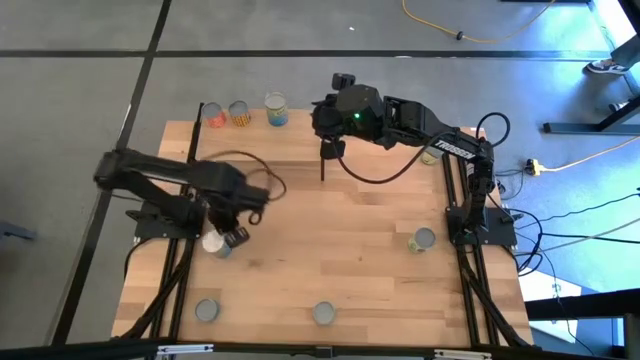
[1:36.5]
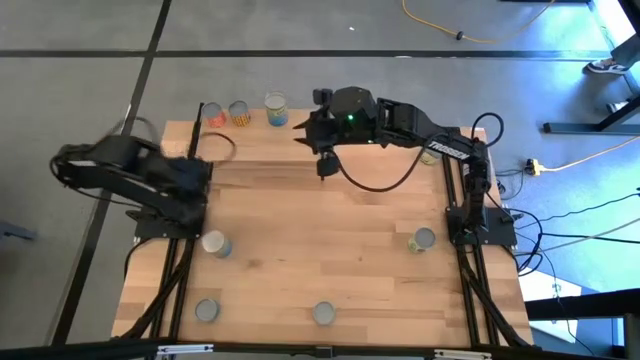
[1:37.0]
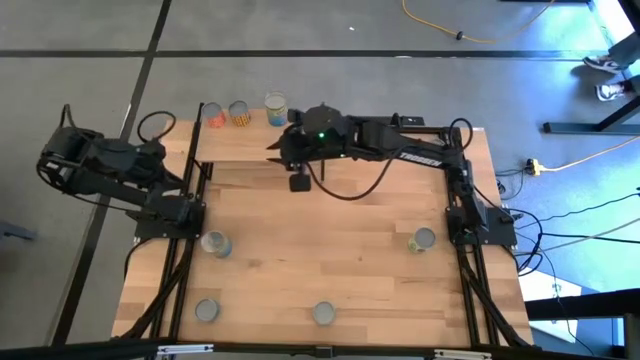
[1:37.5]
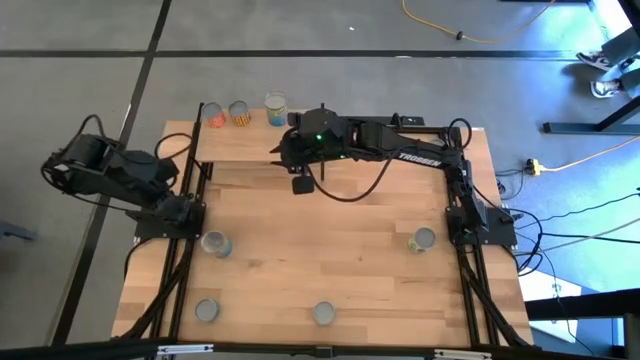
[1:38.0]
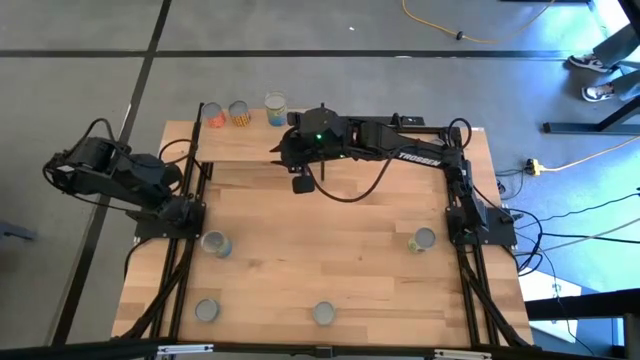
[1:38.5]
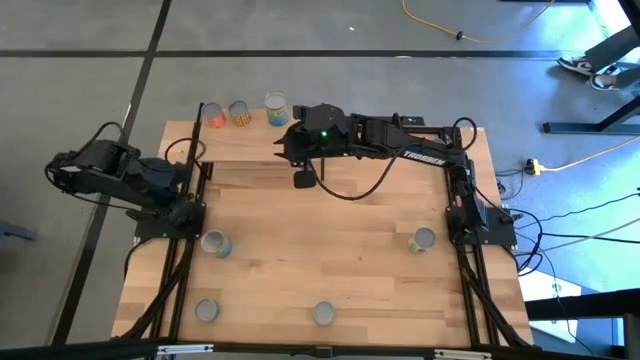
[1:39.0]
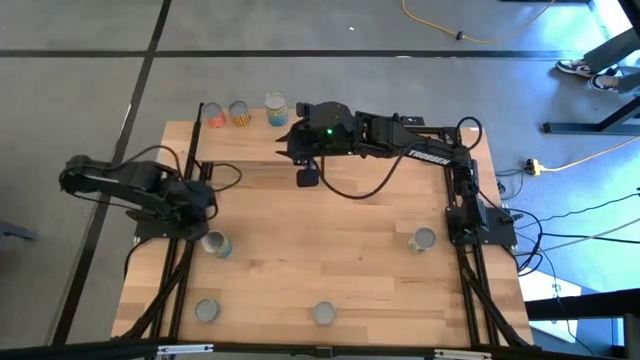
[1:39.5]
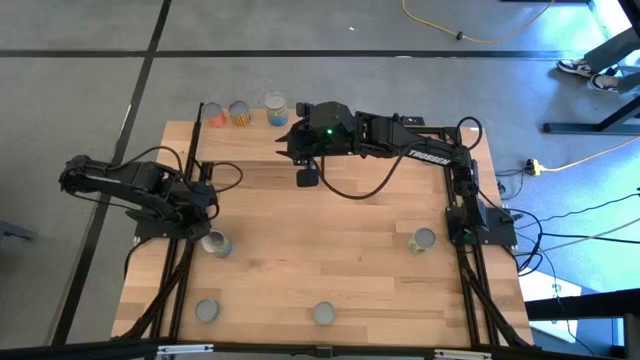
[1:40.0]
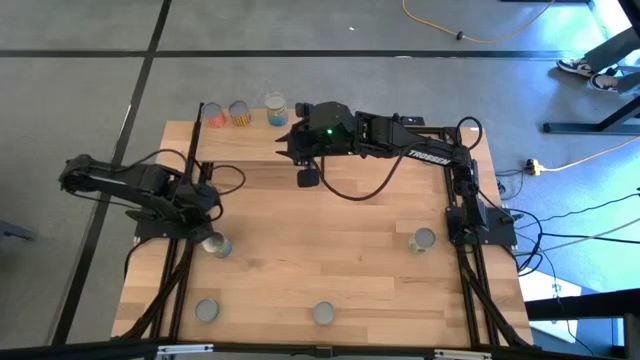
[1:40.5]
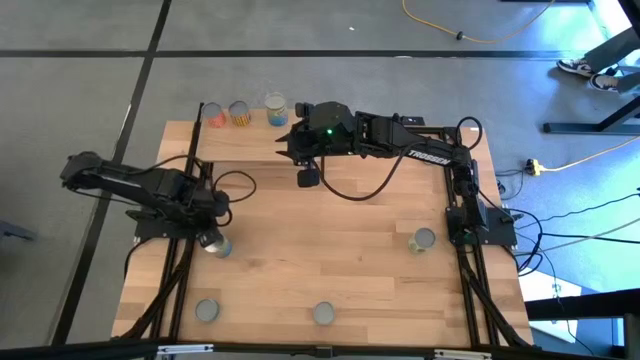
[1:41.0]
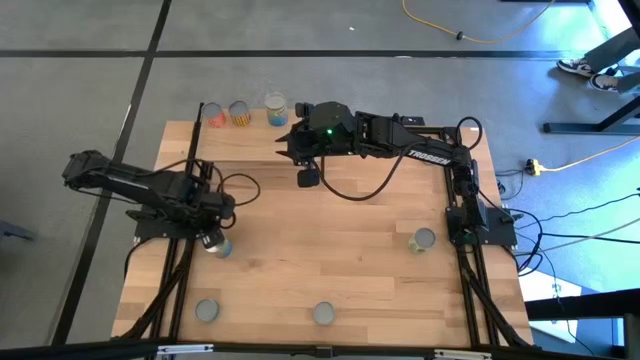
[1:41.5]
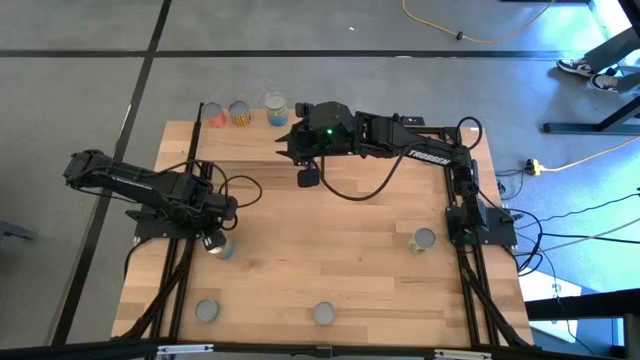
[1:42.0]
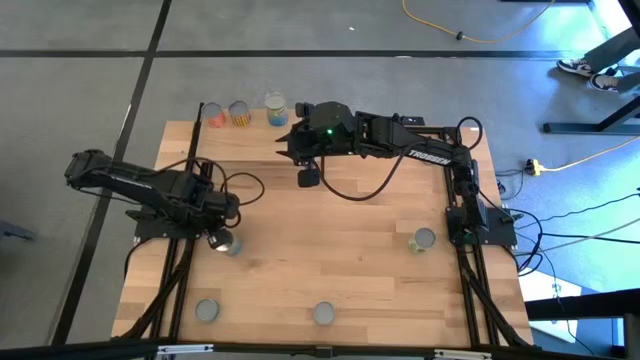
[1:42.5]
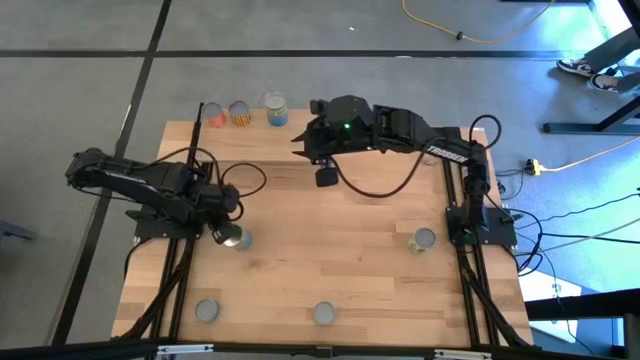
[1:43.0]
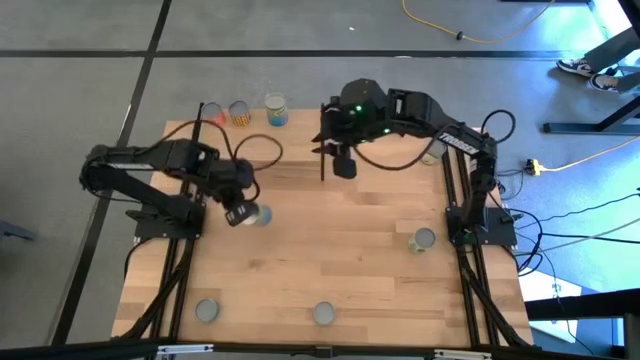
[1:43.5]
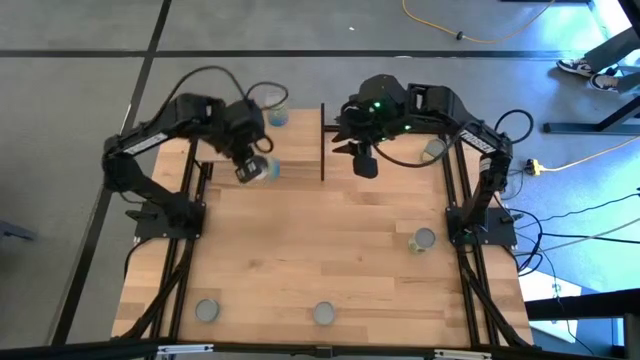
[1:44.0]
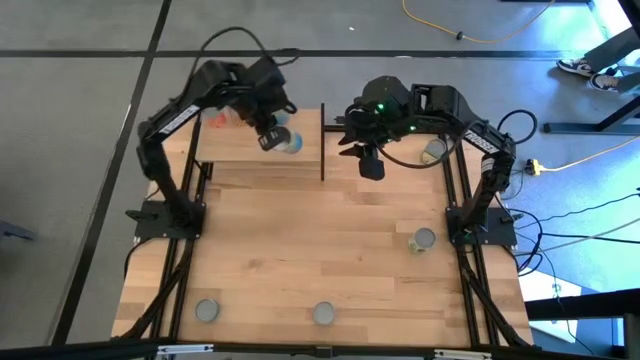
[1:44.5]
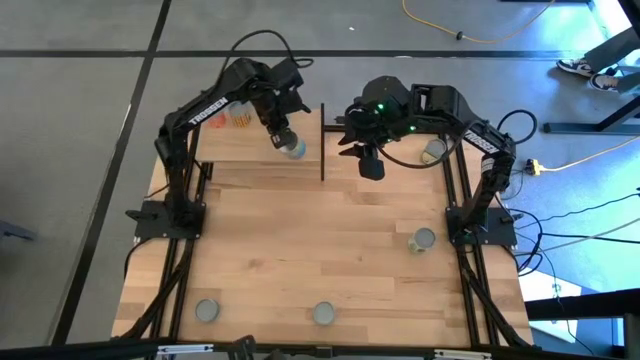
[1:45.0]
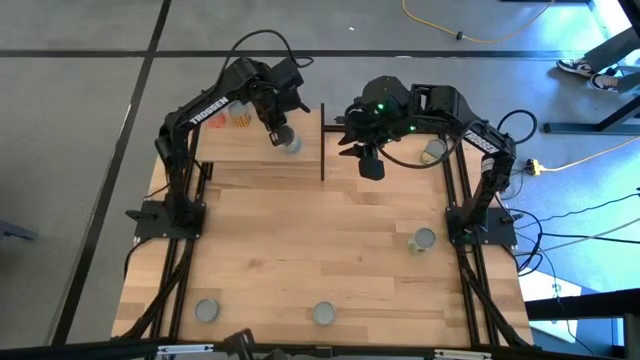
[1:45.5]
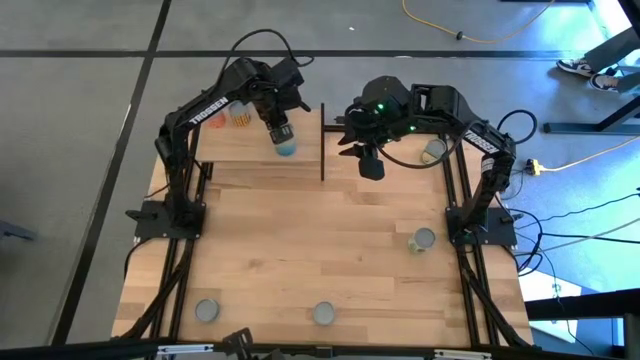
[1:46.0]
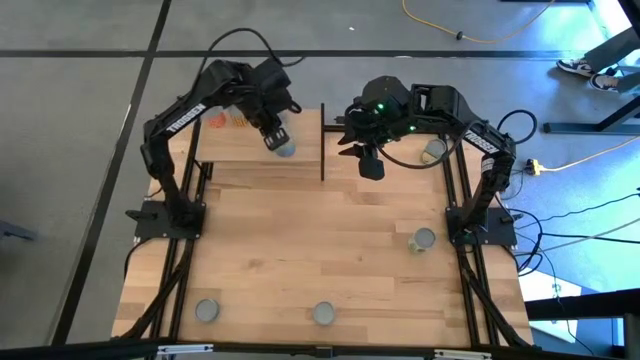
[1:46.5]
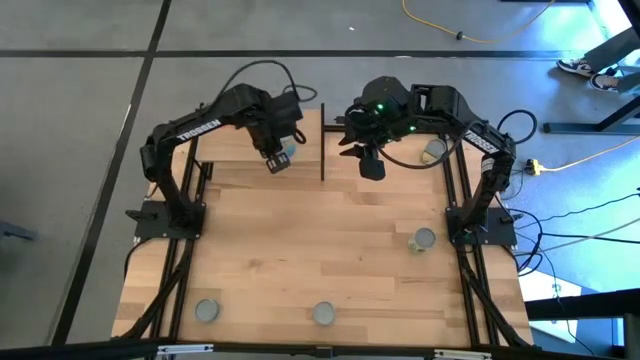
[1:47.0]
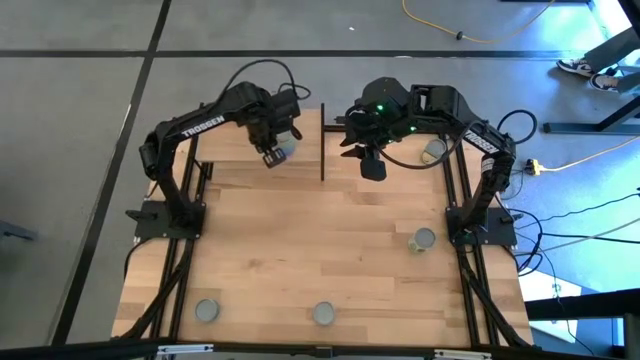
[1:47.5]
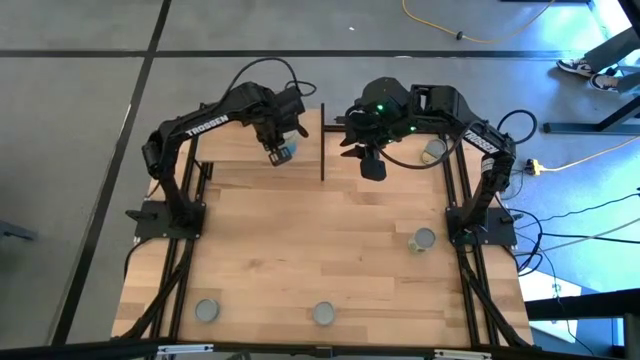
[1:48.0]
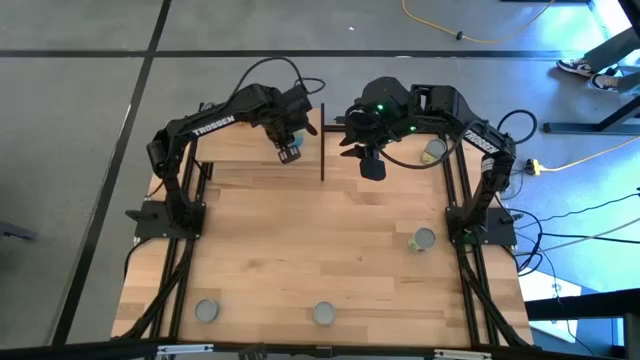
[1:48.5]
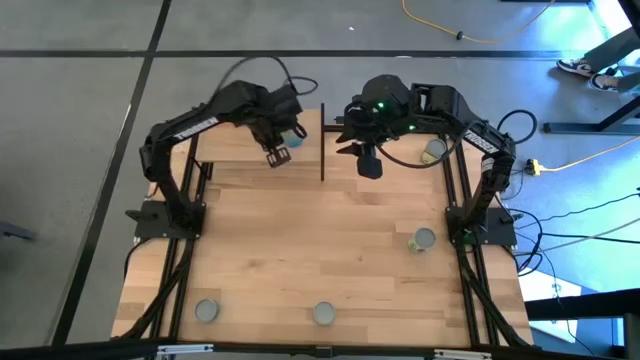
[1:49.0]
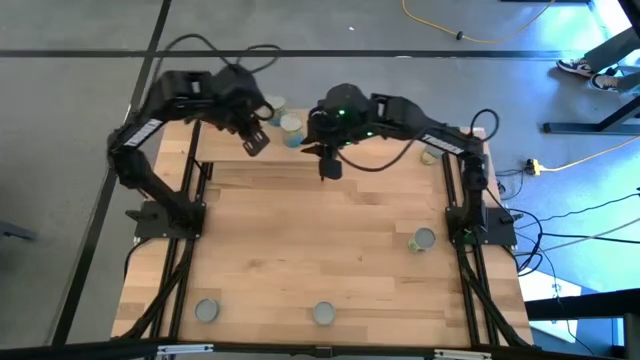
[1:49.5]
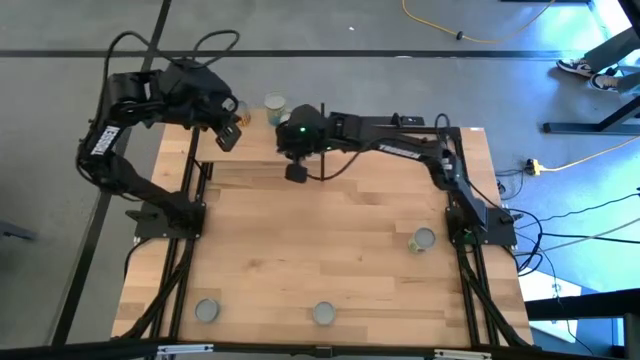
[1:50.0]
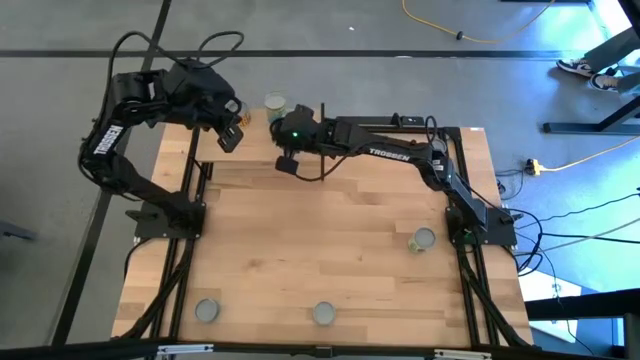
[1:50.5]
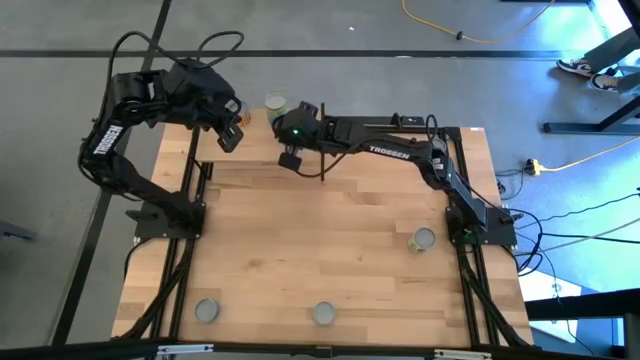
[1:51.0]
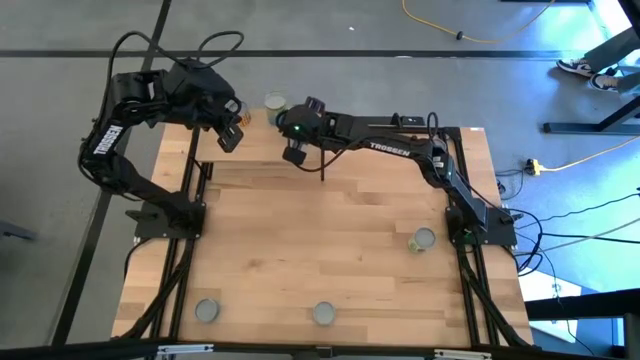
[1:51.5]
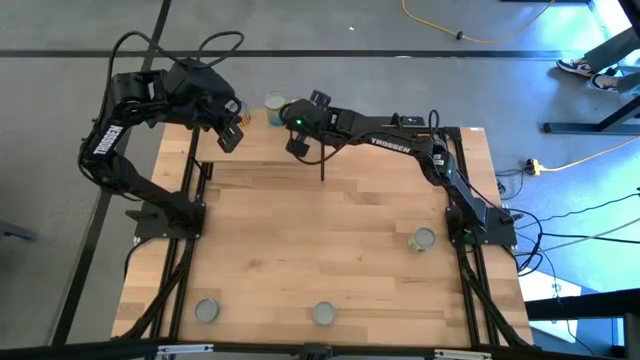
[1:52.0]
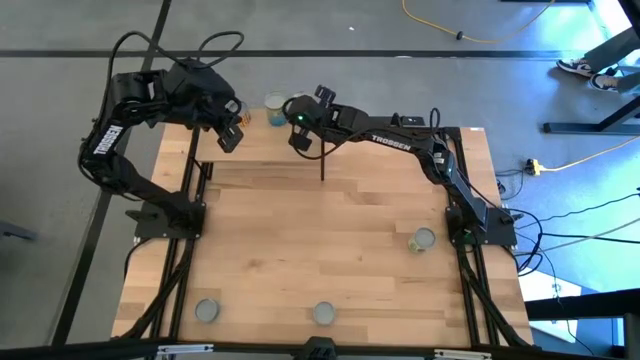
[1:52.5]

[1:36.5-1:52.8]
Task: Pick and place cans onto a shelf
Put the canned cherries on the shelf
